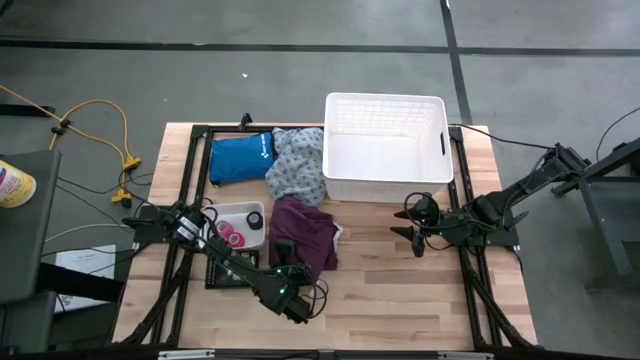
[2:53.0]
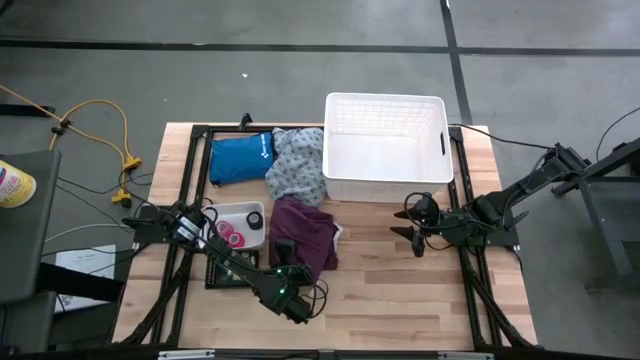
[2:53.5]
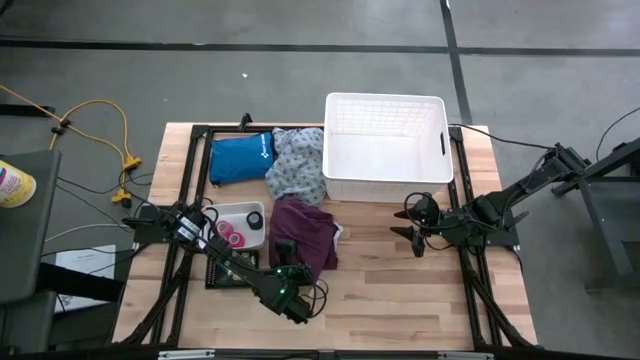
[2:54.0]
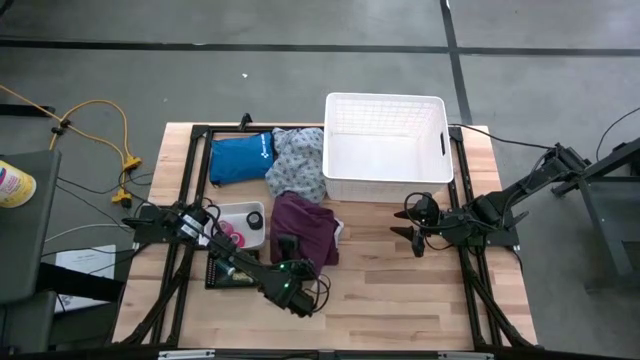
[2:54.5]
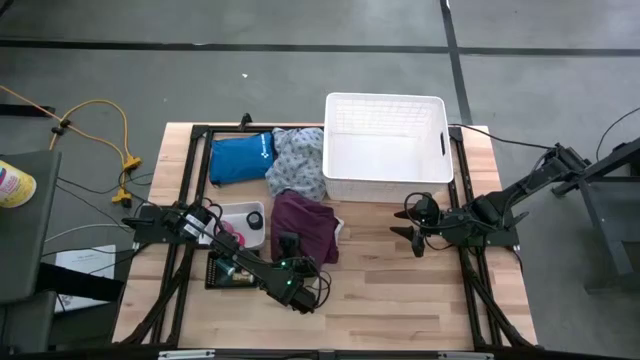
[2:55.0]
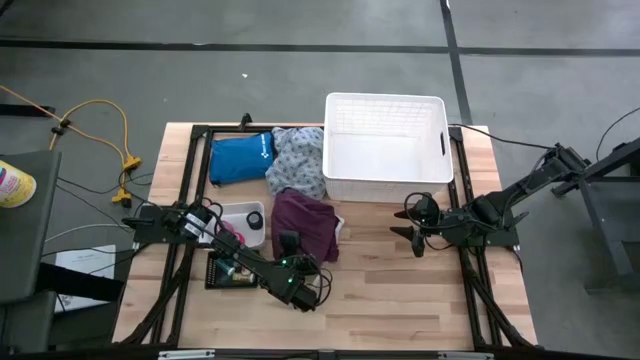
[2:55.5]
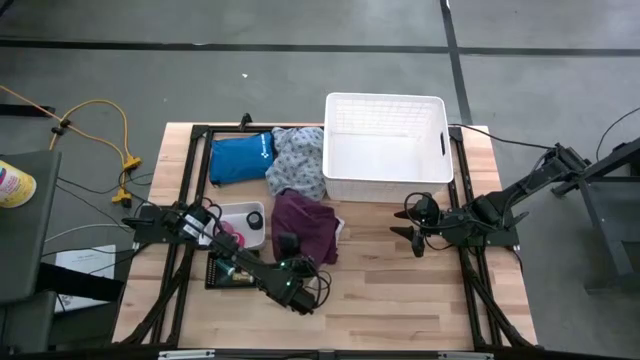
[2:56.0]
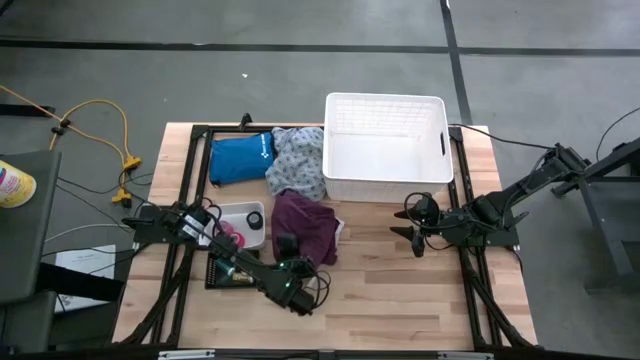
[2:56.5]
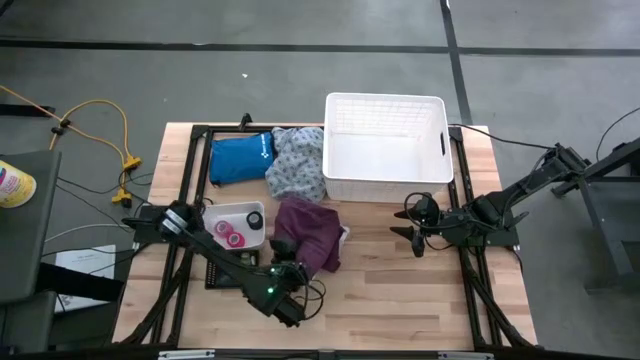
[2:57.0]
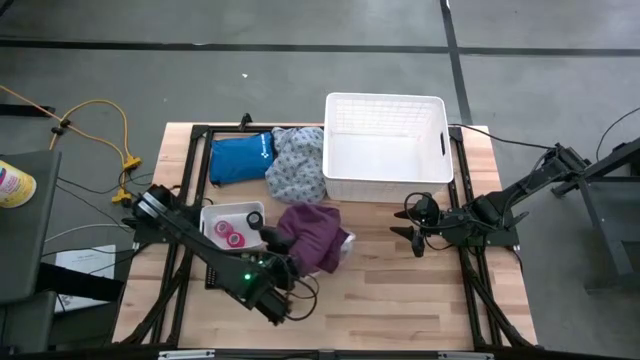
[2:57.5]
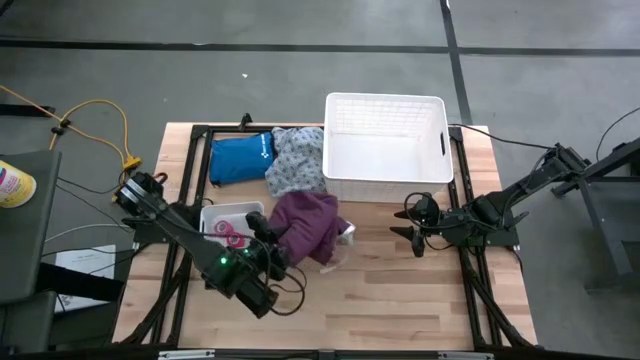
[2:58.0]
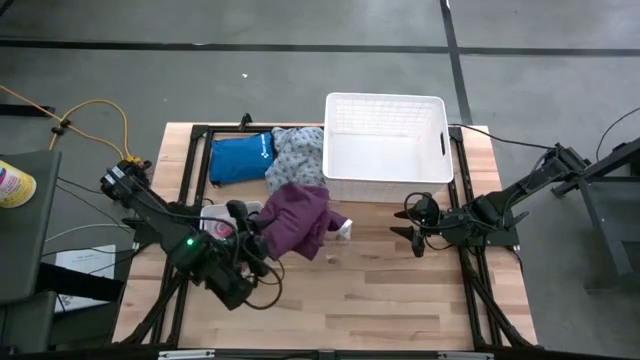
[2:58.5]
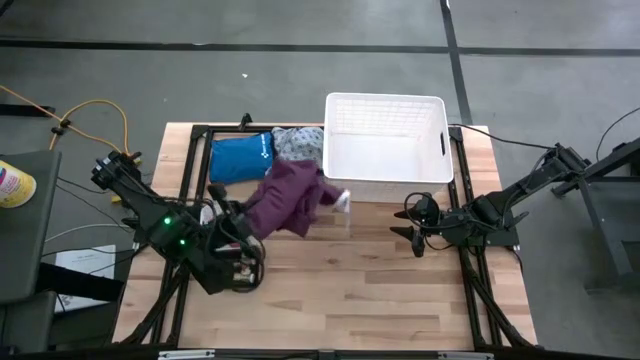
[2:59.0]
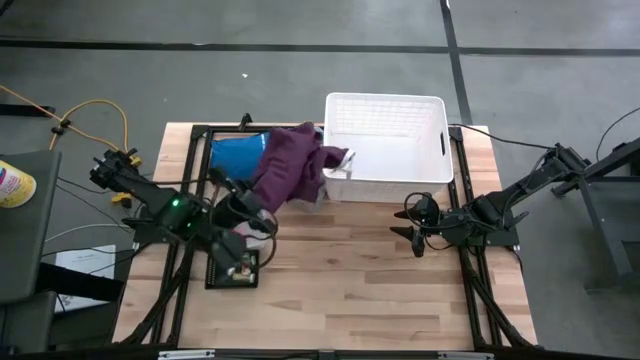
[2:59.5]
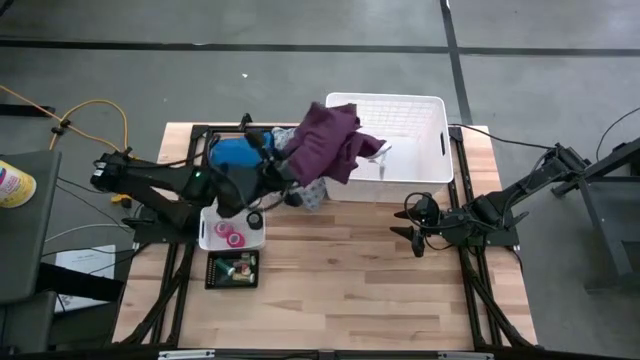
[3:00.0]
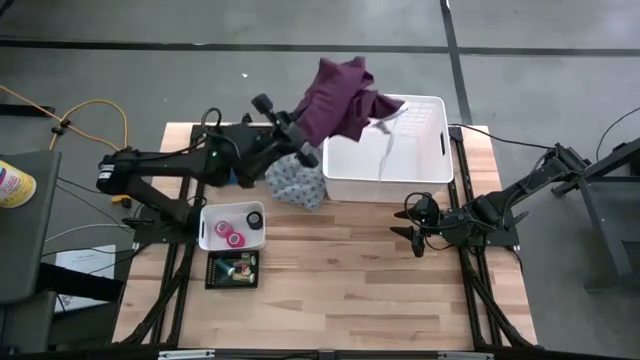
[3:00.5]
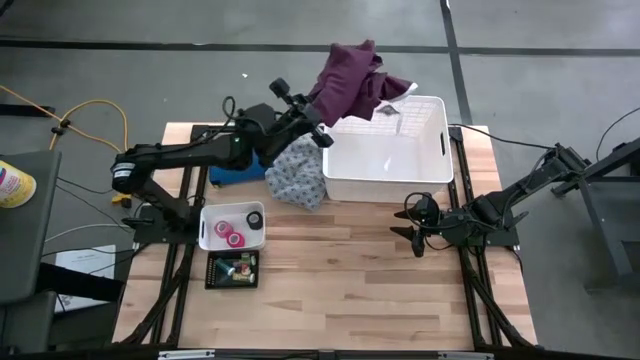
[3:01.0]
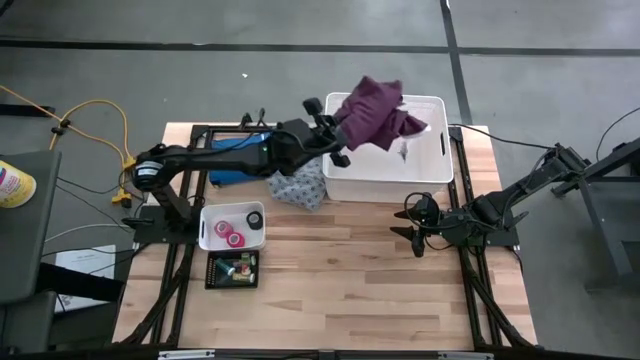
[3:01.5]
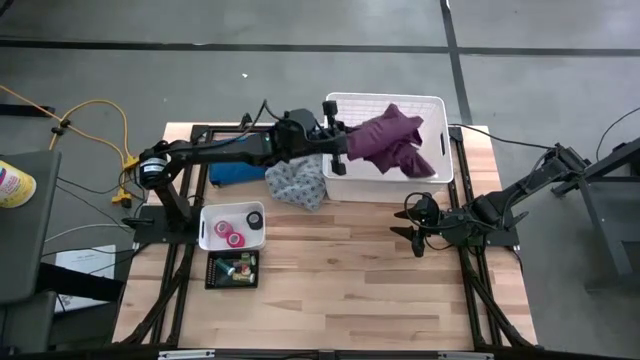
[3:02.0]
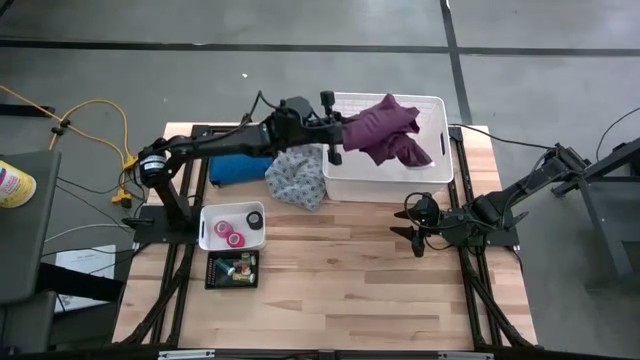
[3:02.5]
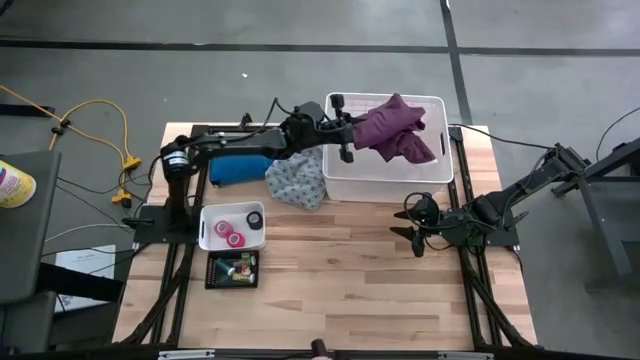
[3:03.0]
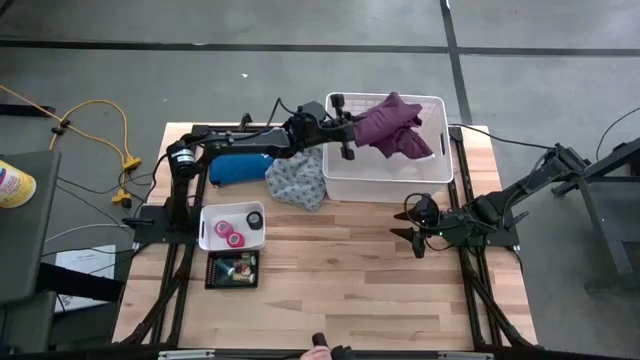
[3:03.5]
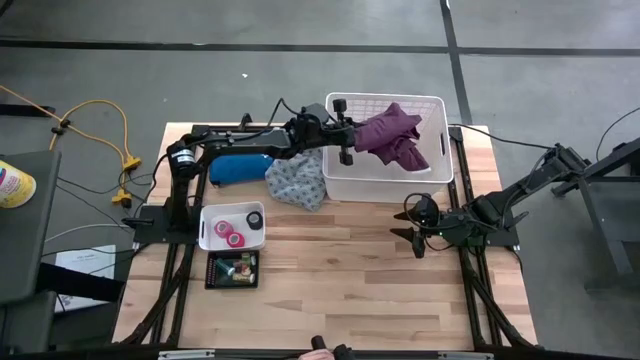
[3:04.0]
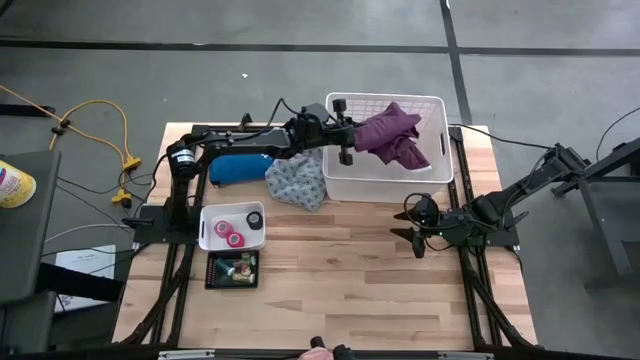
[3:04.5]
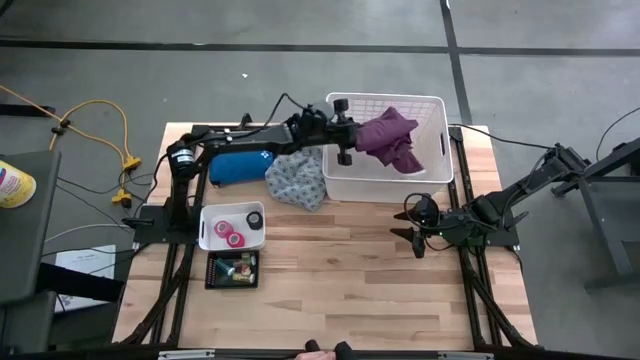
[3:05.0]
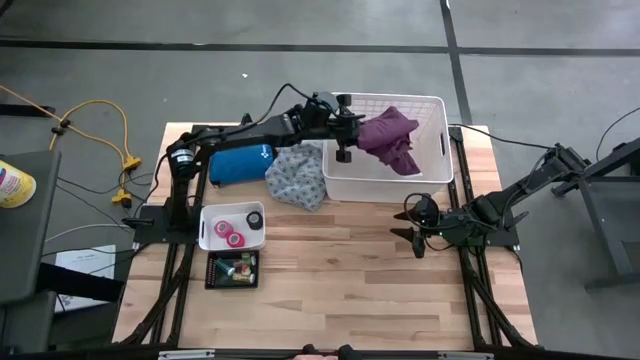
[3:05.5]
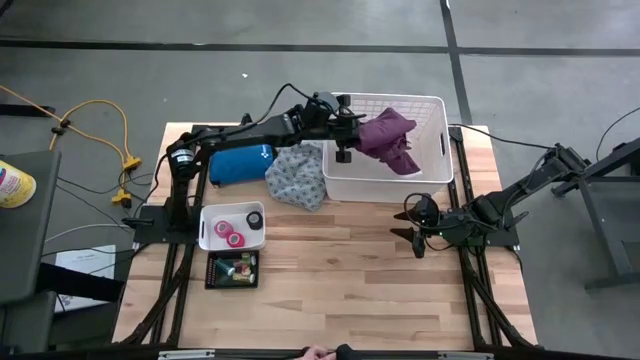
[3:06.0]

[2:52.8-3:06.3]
Task: Pick & place medical supplies in basket/bin
Put the red patient gown into the white bin

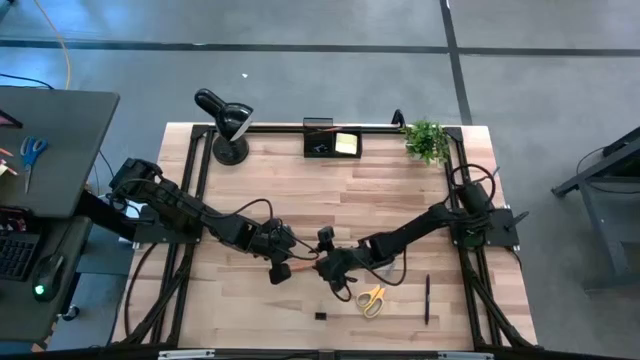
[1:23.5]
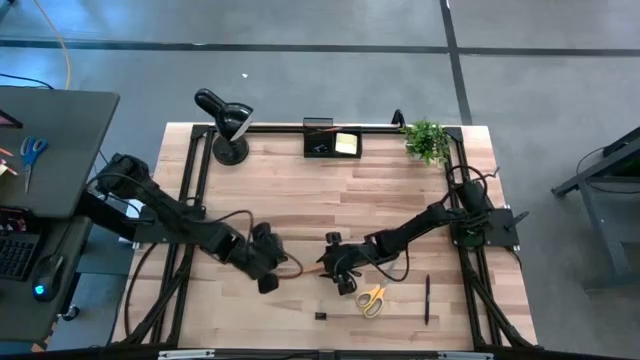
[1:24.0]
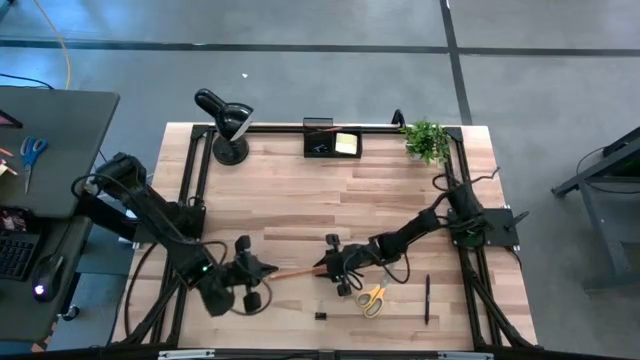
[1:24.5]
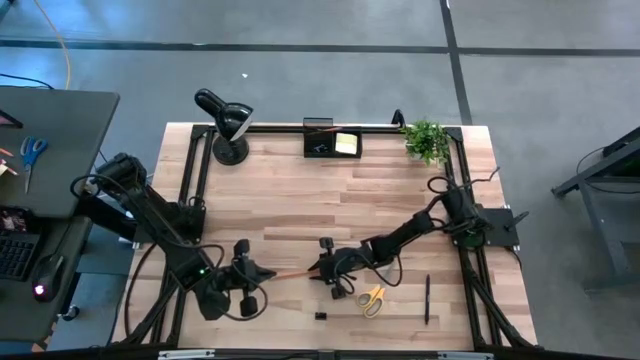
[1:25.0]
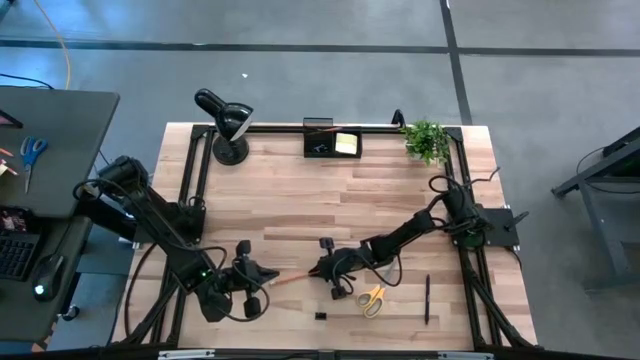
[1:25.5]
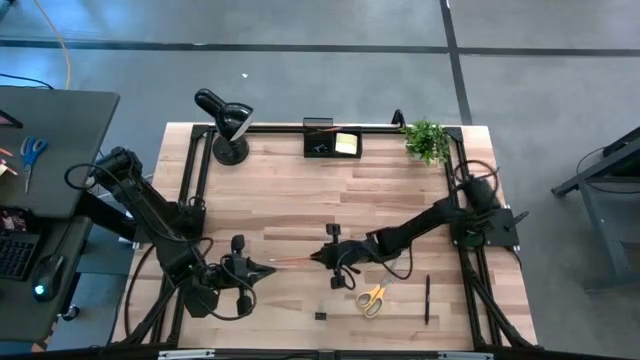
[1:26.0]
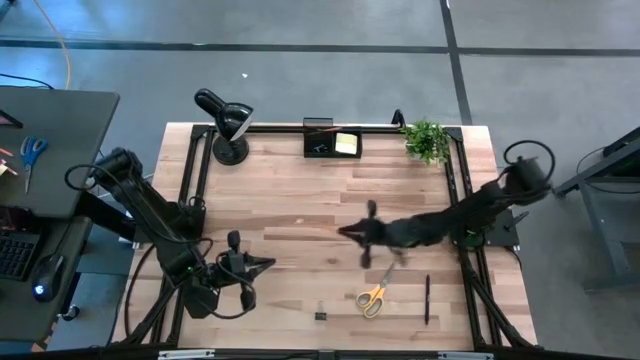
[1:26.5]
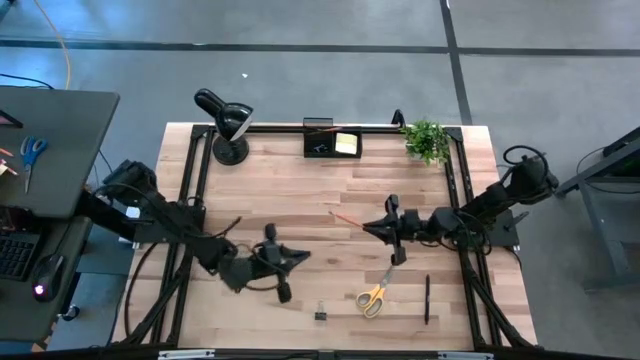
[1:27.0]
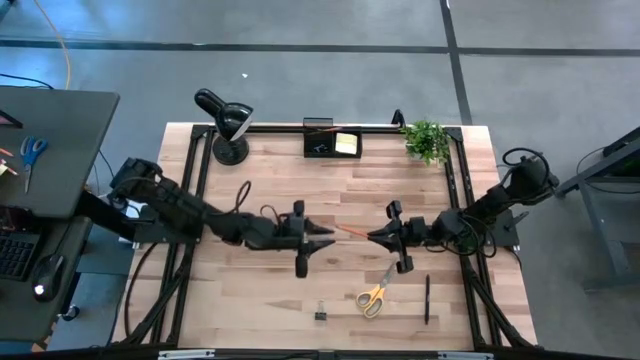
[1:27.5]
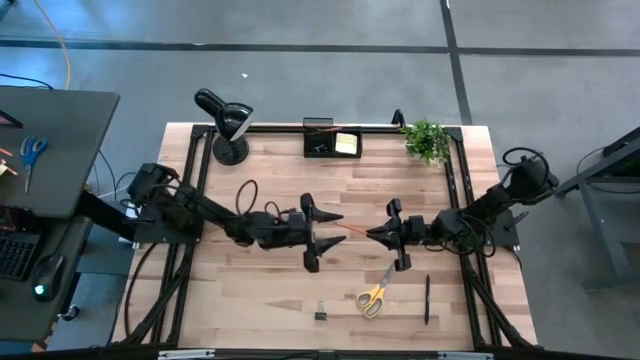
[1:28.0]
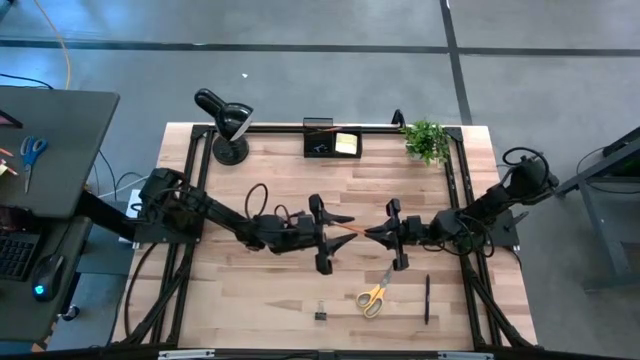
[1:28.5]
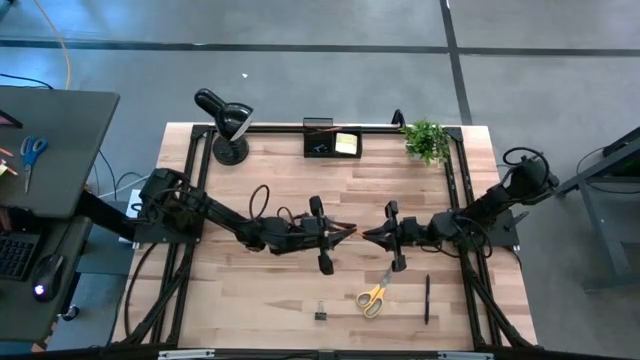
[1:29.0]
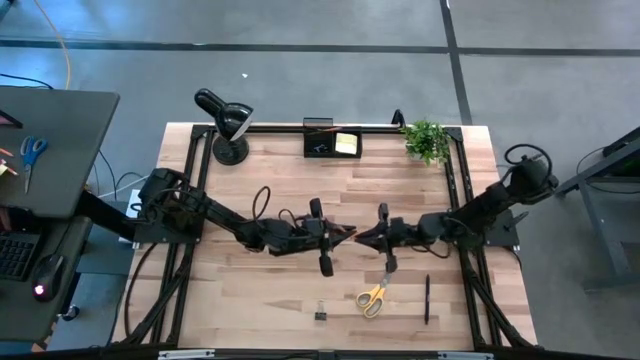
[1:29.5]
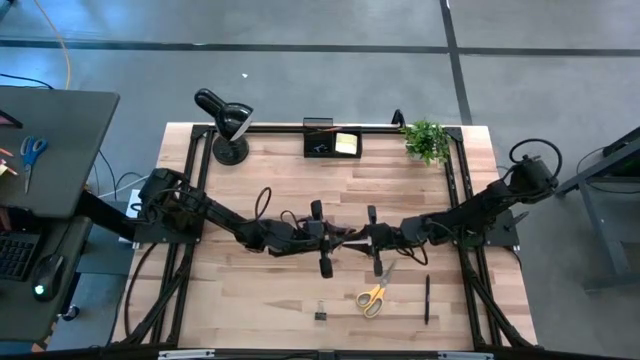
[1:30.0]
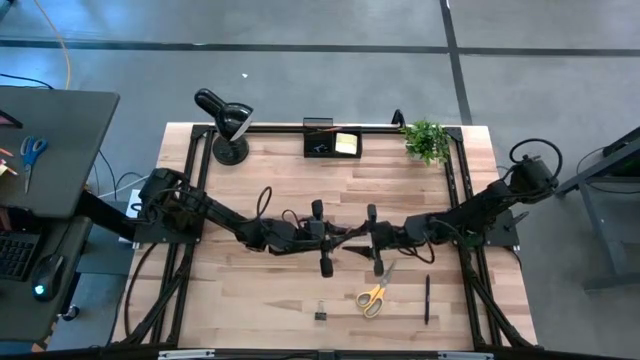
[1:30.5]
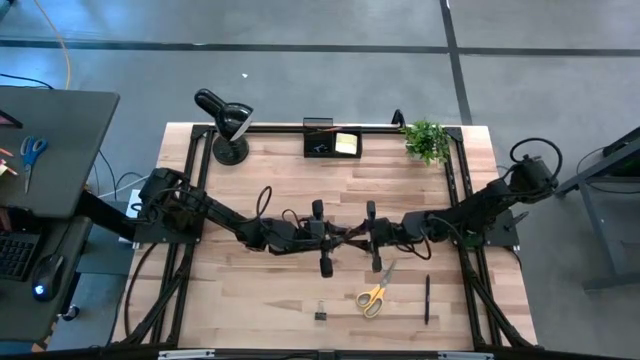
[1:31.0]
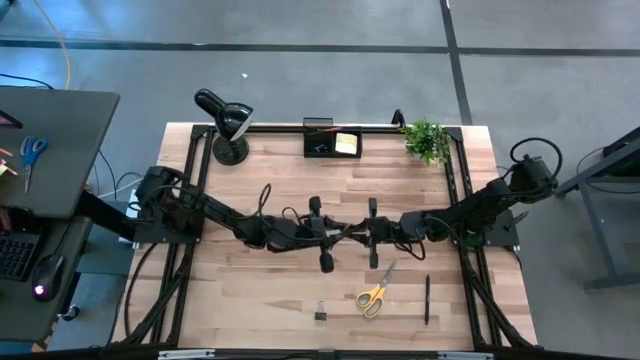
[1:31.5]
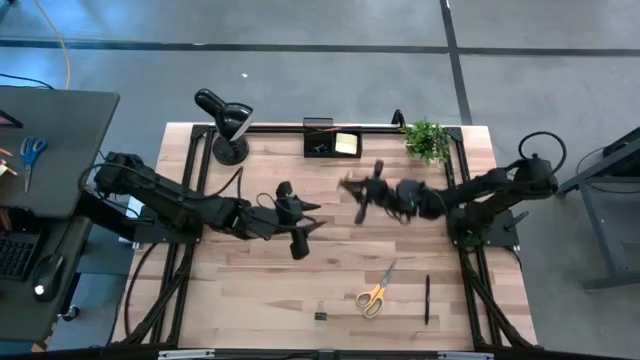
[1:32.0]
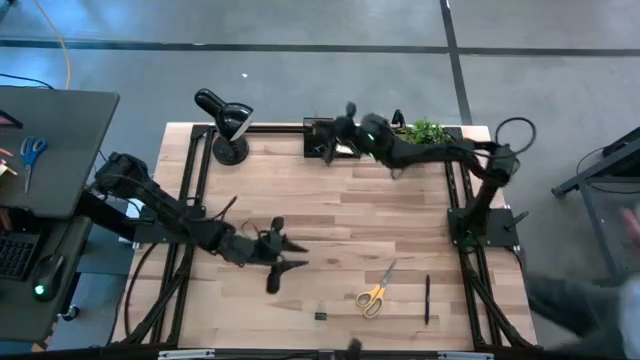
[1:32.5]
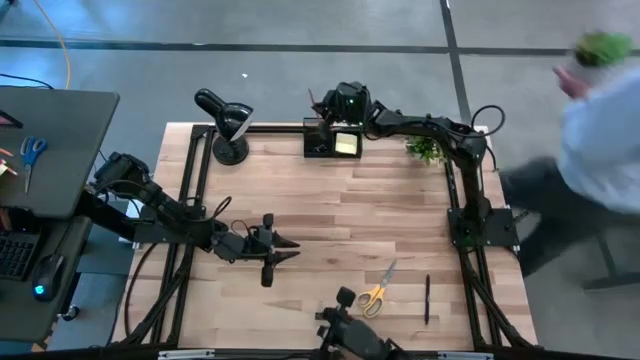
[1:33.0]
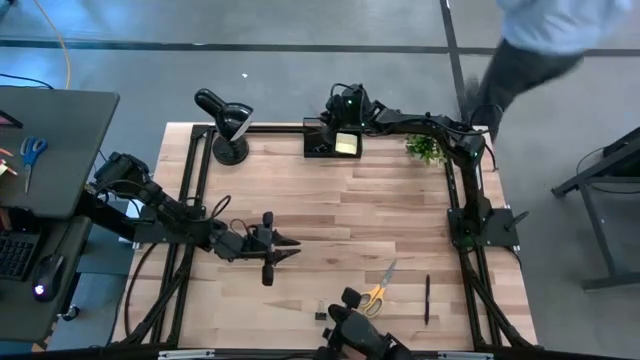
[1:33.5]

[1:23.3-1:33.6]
Task: Pick and place office supplies into organizer
Put the orange pencil into the black desk organizer
